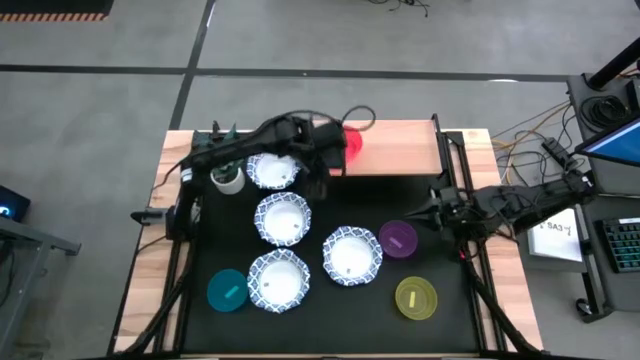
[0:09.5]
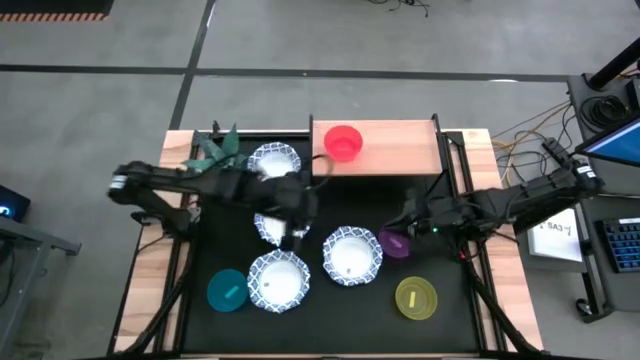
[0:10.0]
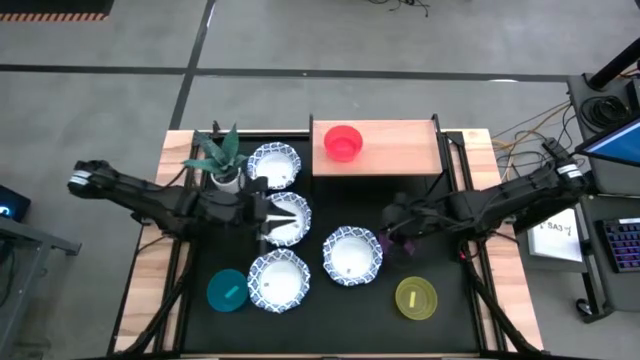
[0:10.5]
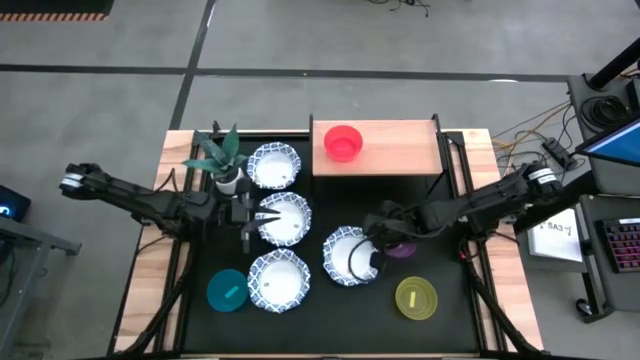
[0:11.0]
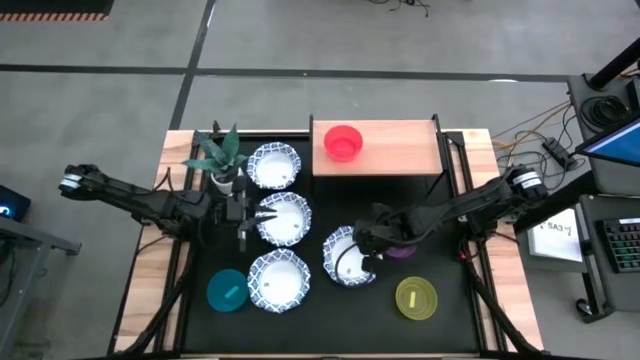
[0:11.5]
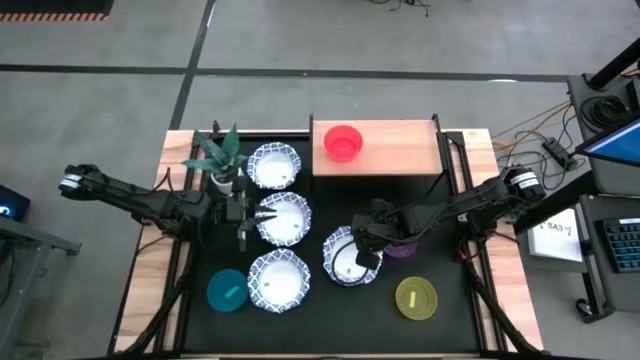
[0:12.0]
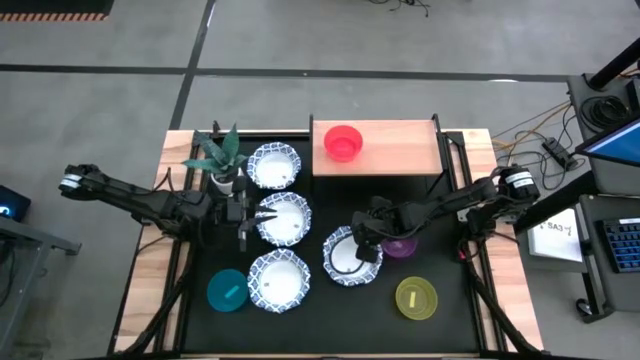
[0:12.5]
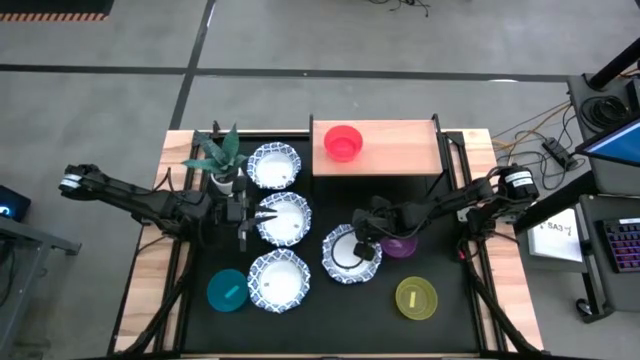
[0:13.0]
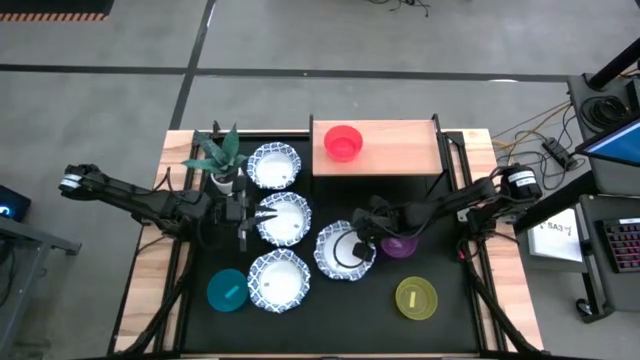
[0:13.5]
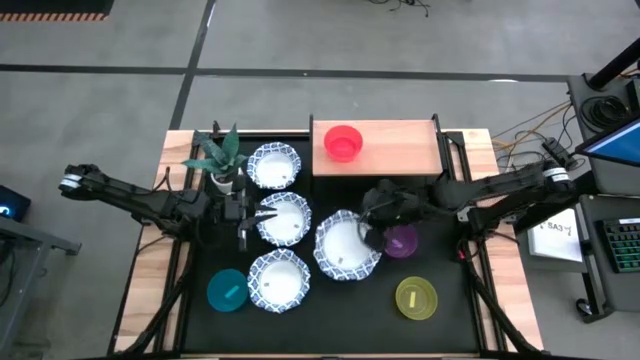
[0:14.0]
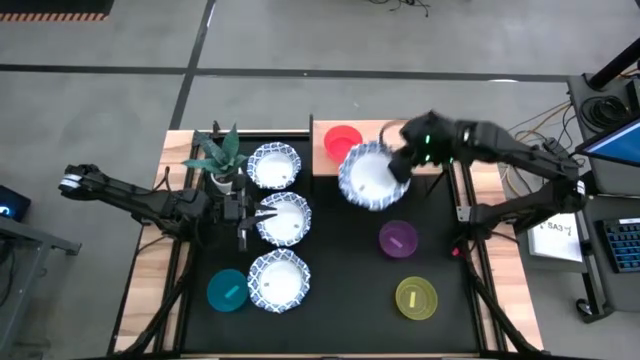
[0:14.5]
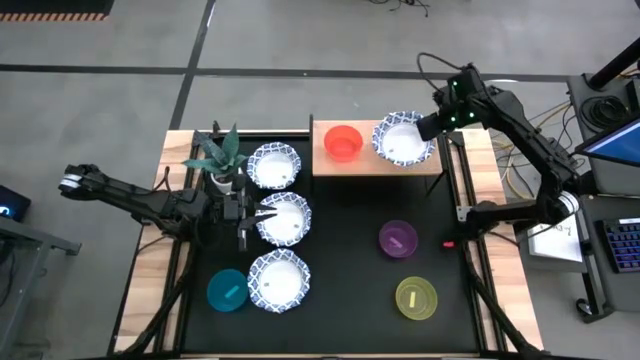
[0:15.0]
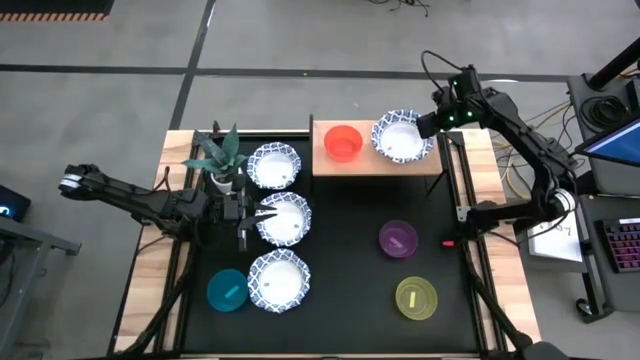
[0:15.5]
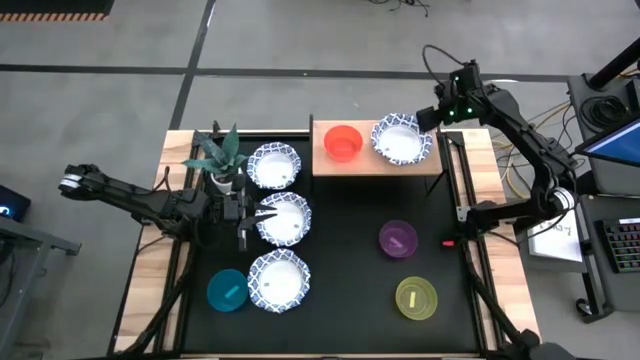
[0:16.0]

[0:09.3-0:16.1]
Task: Place and stack bowls onto a shelf
Put the white paper plate on the shelf

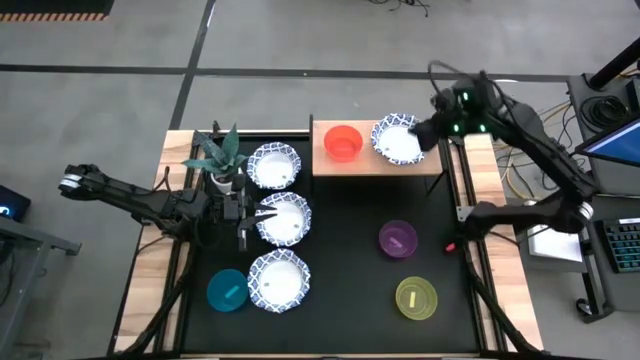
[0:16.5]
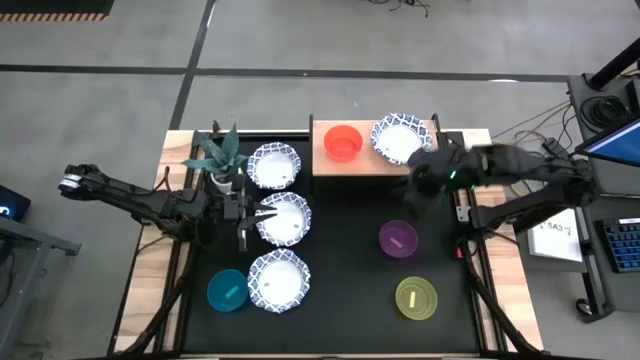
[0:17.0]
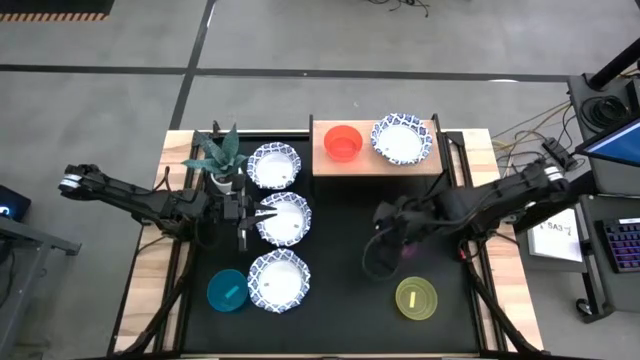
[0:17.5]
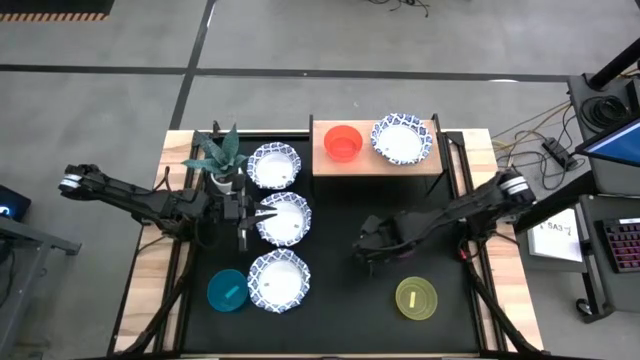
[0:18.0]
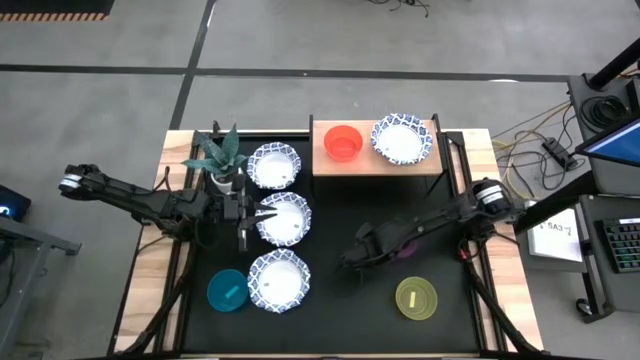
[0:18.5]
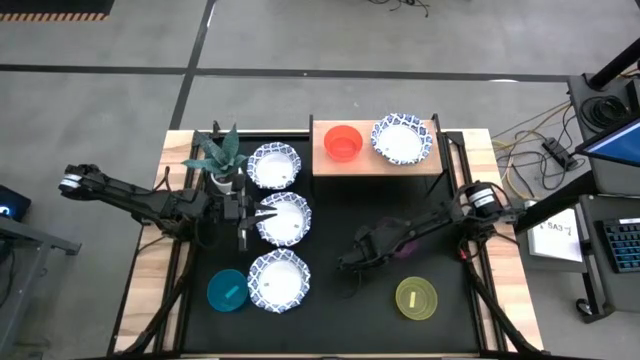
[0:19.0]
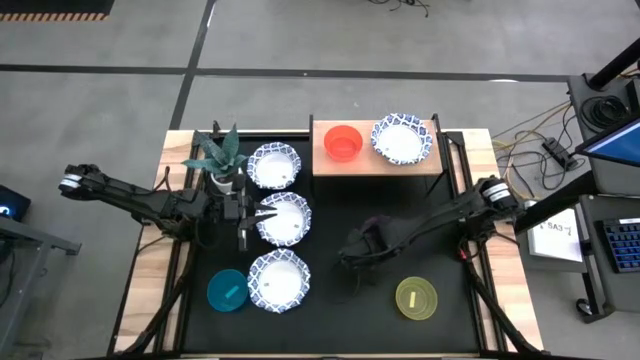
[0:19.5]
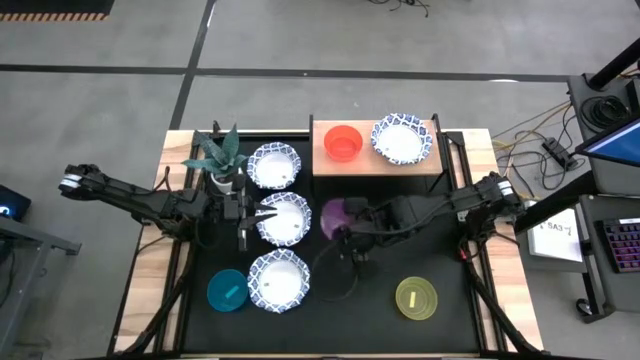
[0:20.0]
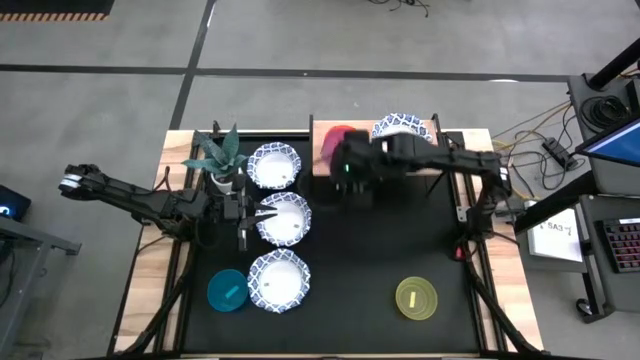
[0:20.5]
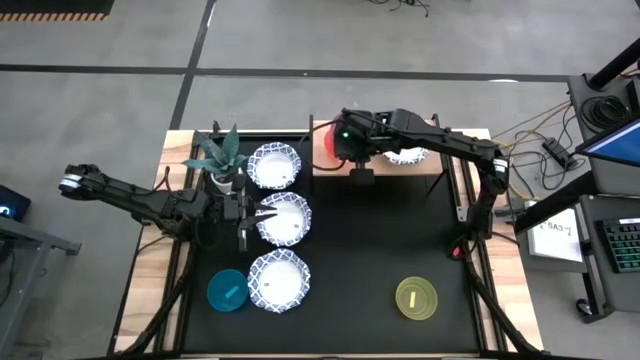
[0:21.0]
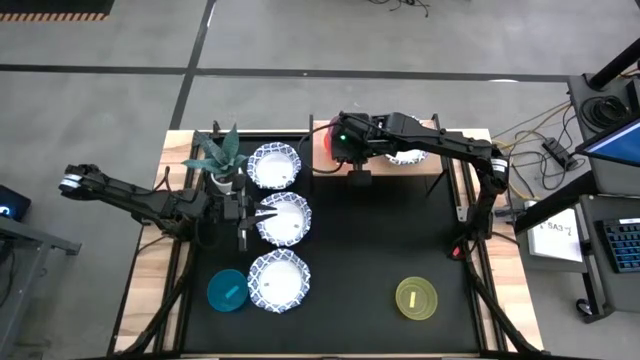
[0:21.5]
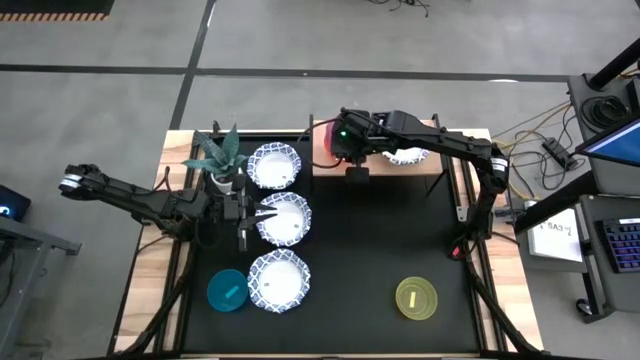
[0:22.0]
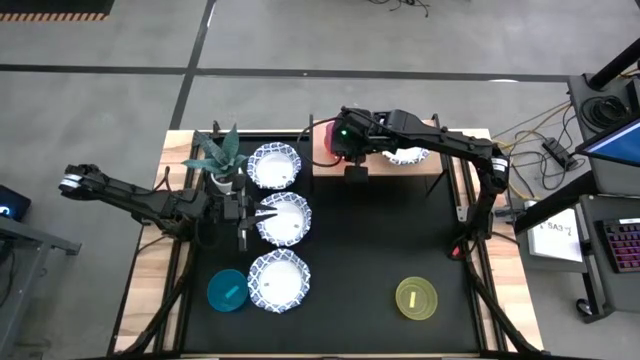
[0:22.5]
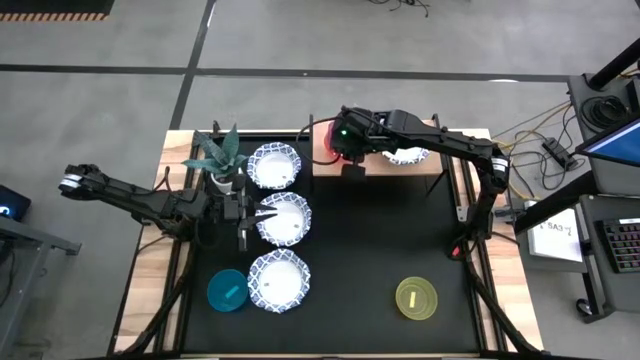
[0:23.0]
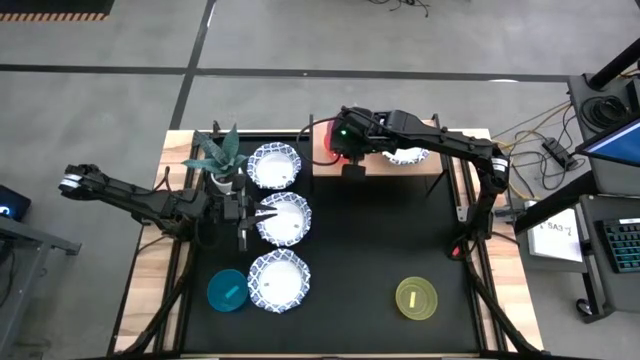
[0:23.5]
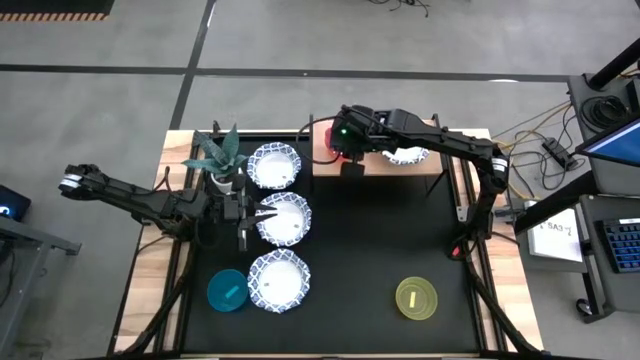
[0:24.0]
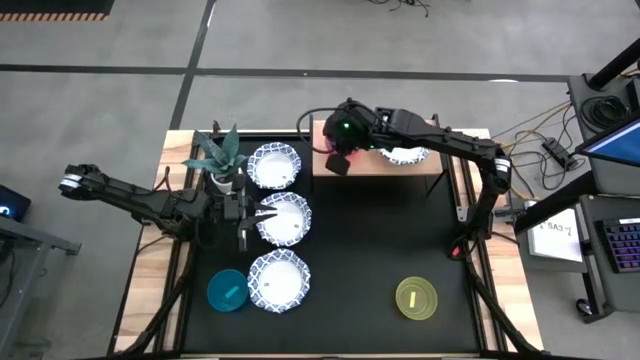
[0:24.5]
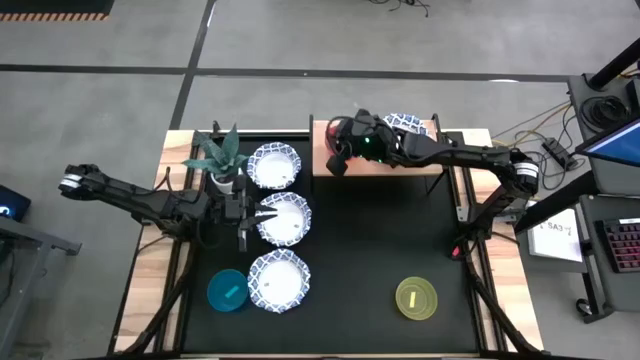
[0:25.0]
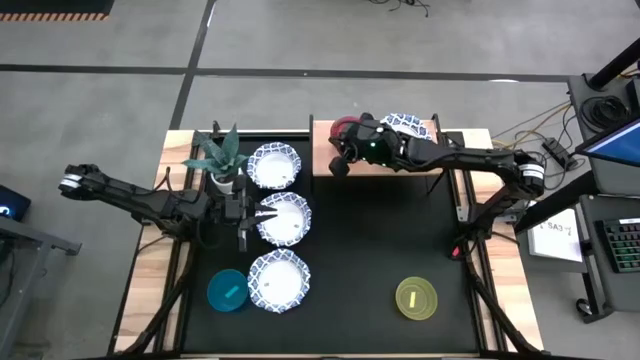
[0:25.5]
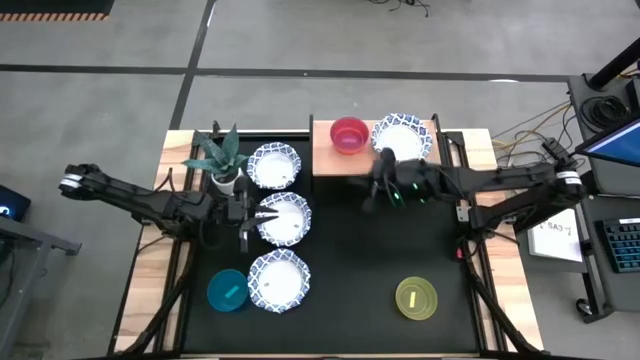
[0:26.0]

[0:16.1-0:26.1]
Stack the violet bowl in the orange bowl on the stock shelf

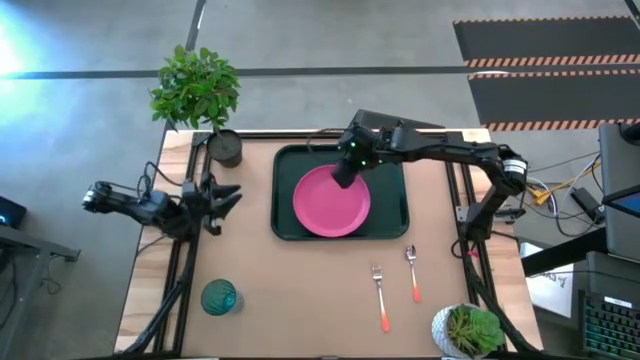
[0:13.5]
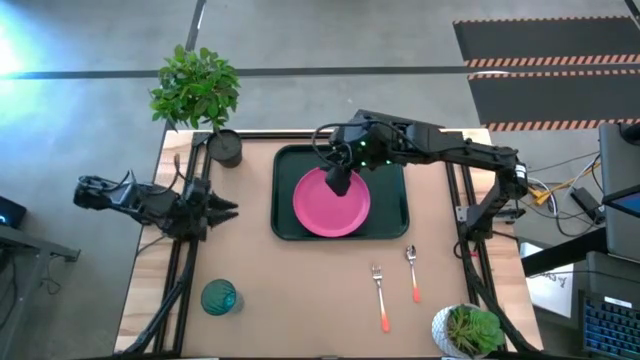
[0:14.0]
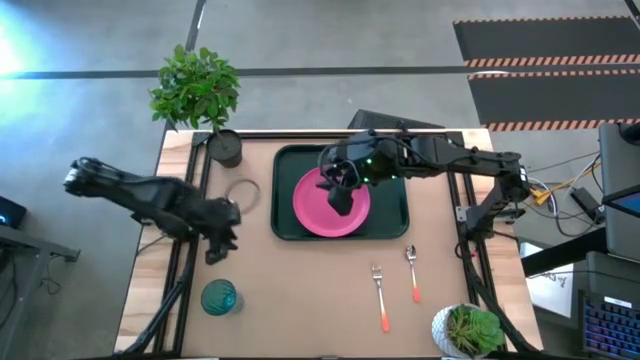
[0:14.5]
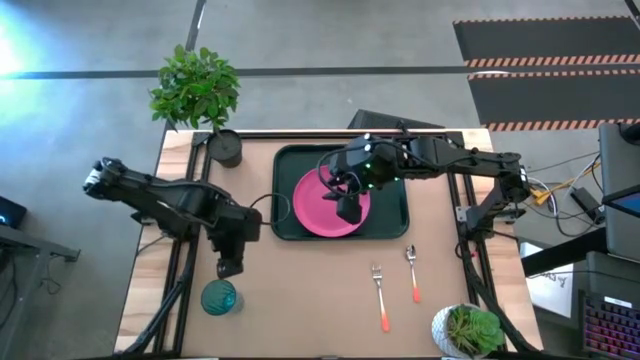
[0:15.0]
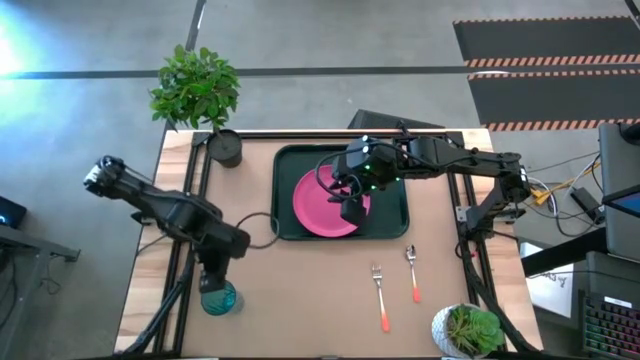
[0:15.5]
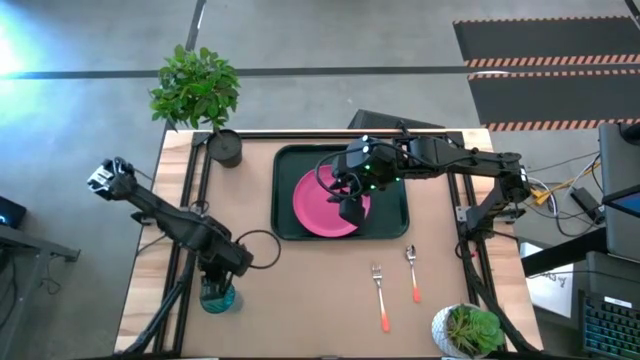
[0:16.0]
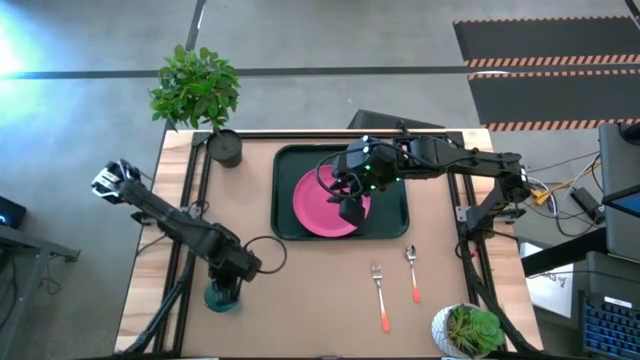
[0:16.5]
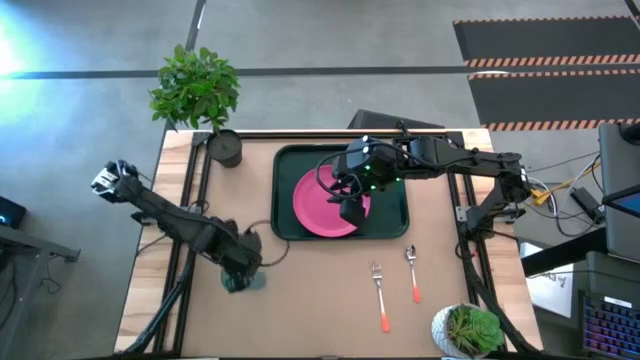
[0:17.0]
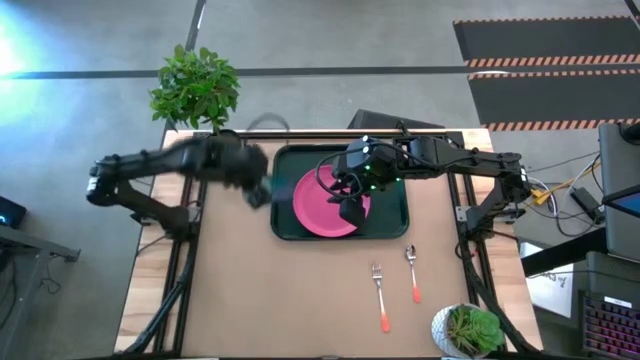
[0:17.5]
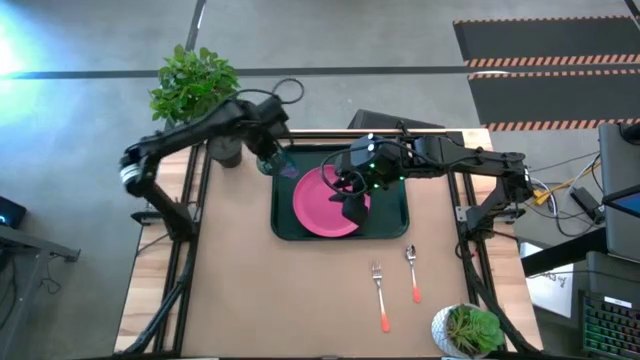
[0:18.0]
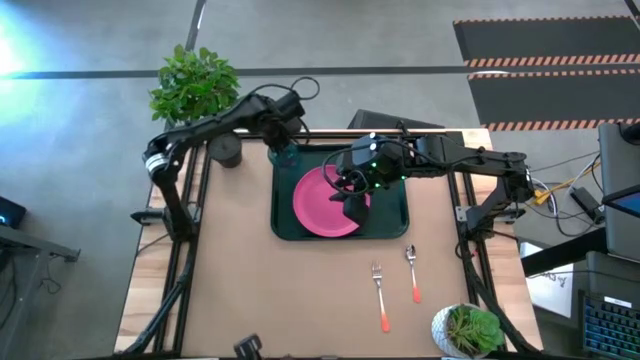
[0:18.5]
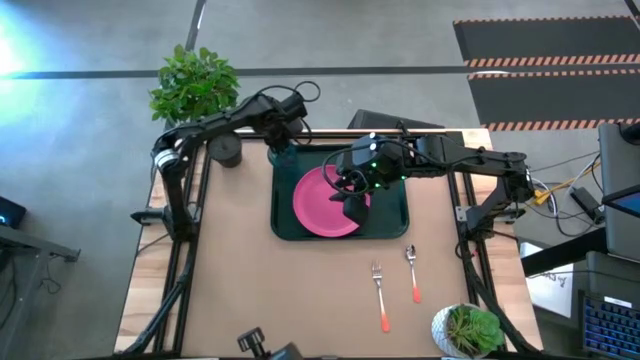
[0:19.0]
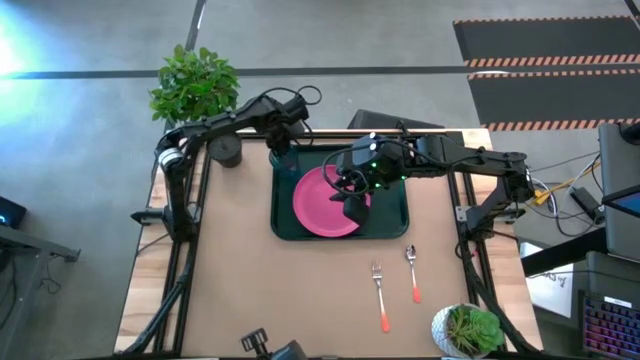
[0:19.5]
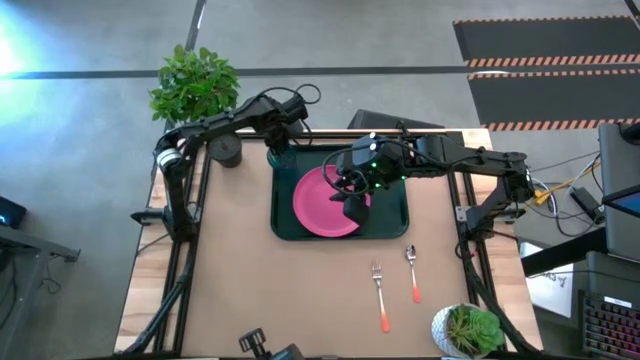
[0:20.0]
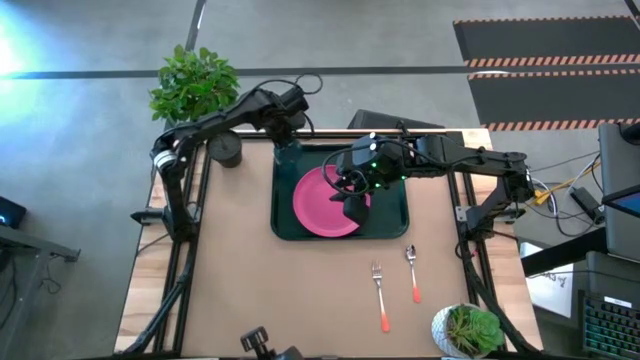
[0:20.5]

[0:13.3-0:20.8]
Task: Pick and place plate/cup/fork/spoon on tray
Put the blue cup on the black tray to the top left of the pink plate
